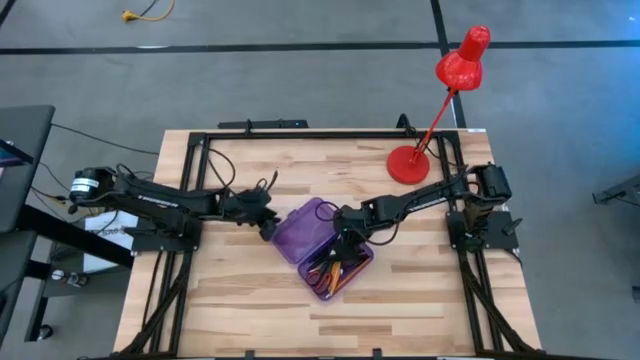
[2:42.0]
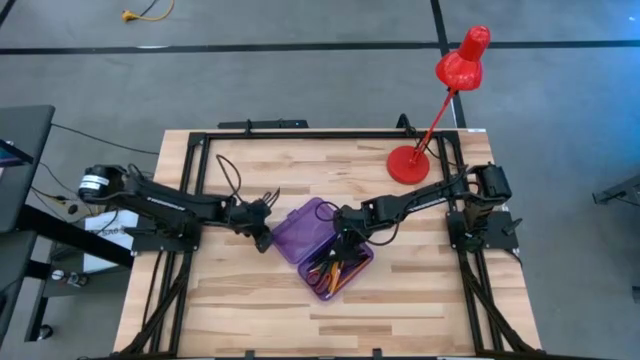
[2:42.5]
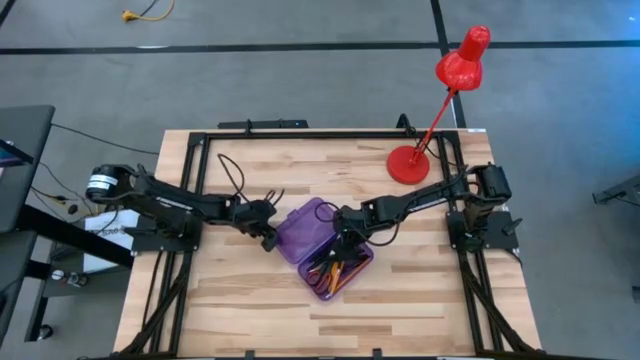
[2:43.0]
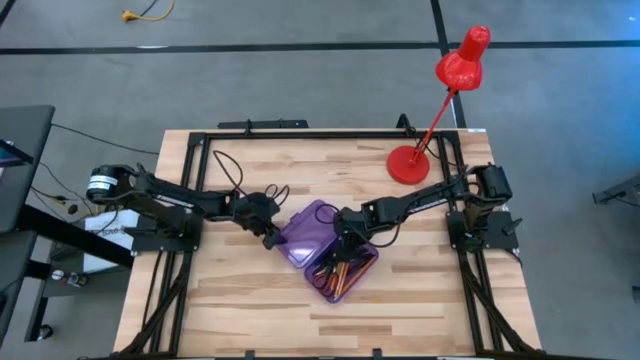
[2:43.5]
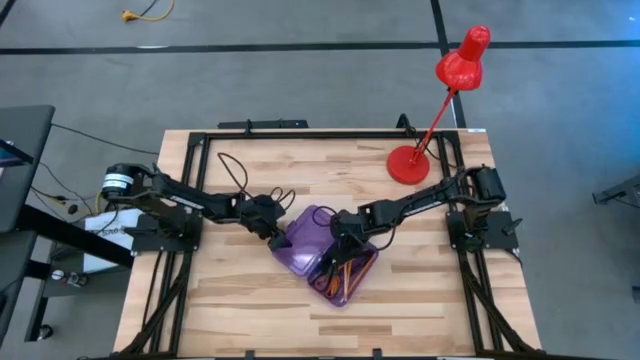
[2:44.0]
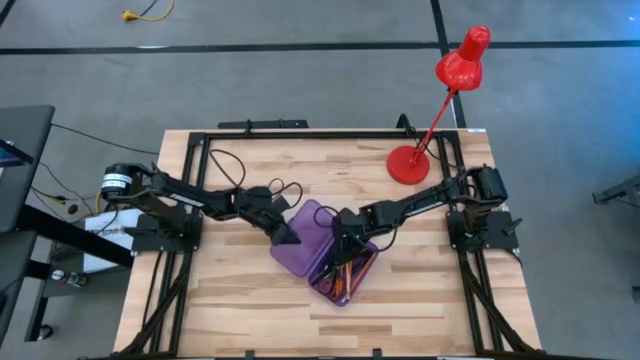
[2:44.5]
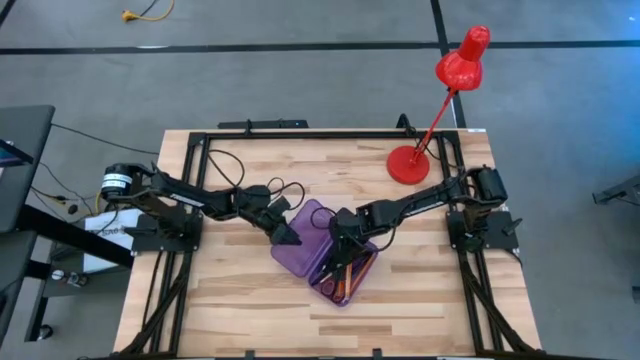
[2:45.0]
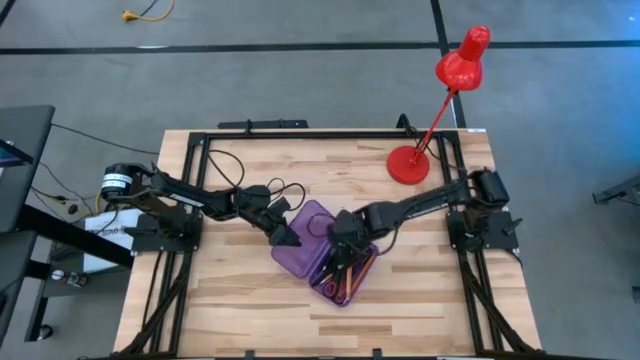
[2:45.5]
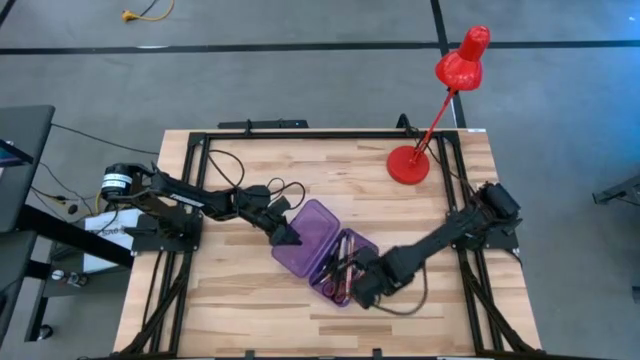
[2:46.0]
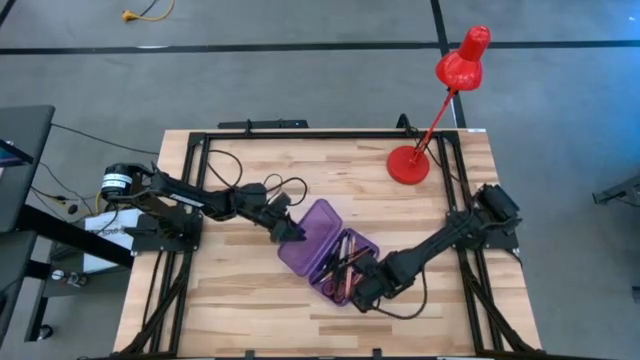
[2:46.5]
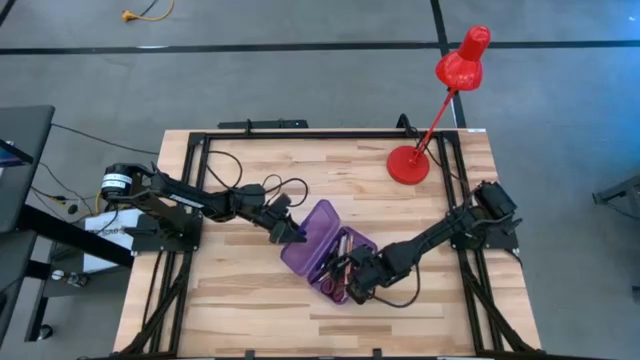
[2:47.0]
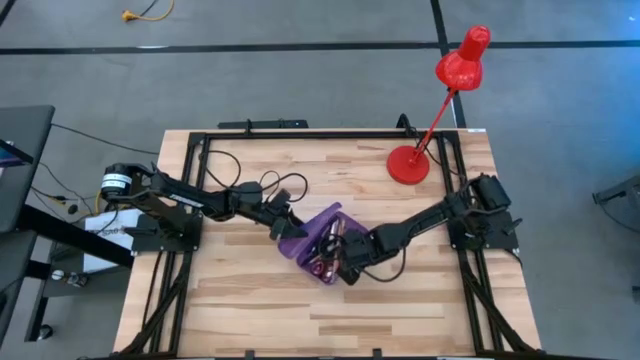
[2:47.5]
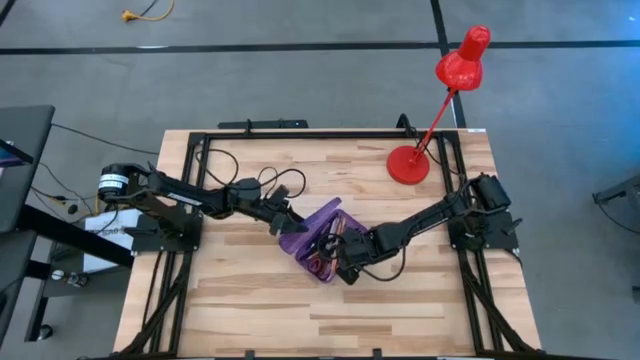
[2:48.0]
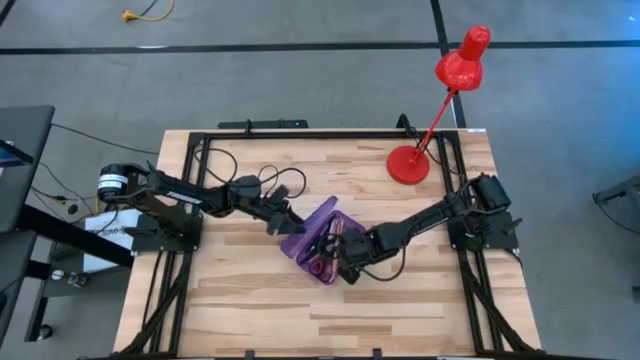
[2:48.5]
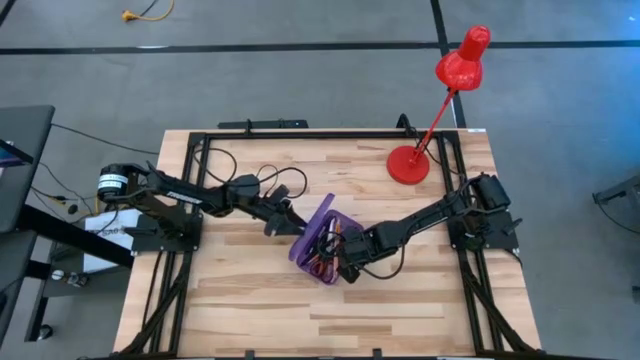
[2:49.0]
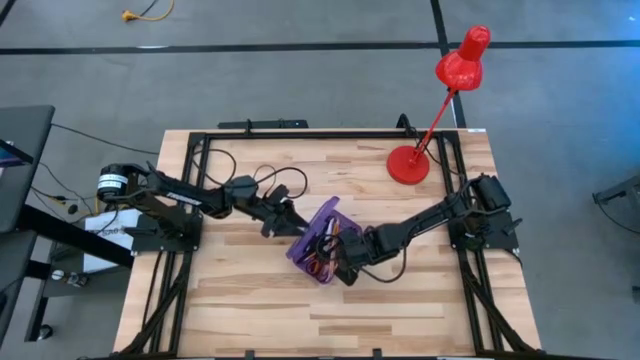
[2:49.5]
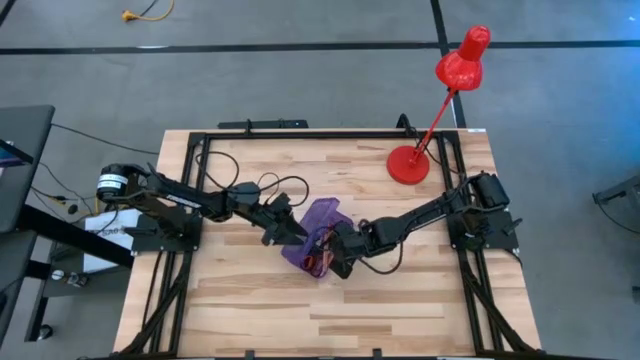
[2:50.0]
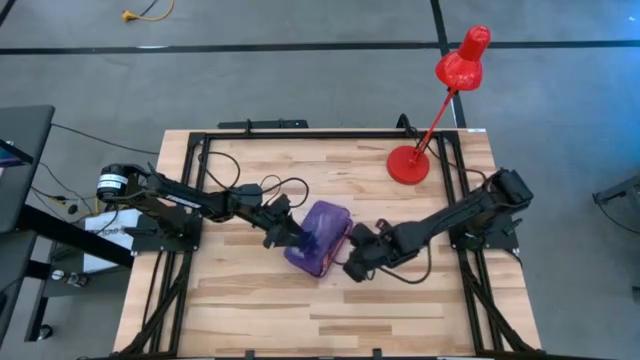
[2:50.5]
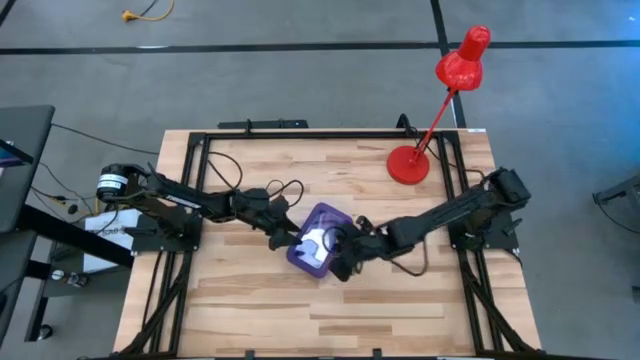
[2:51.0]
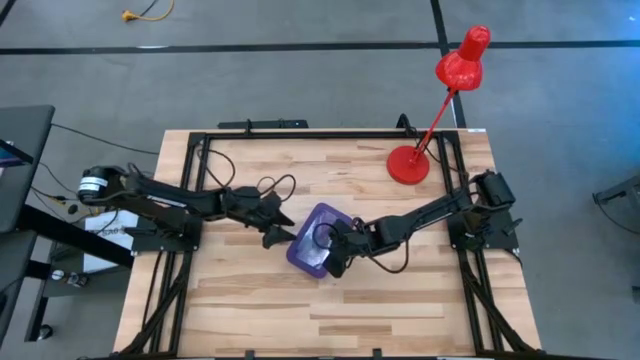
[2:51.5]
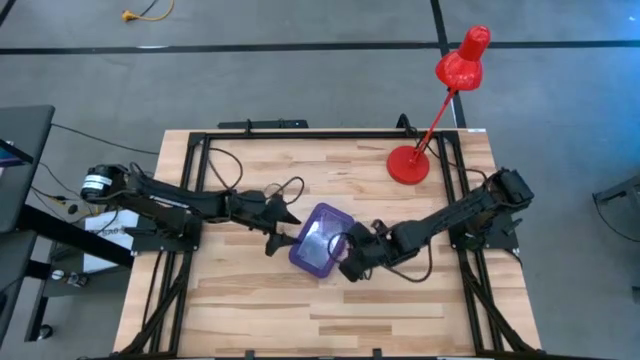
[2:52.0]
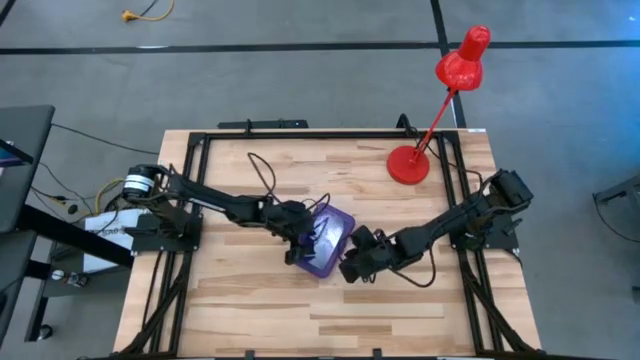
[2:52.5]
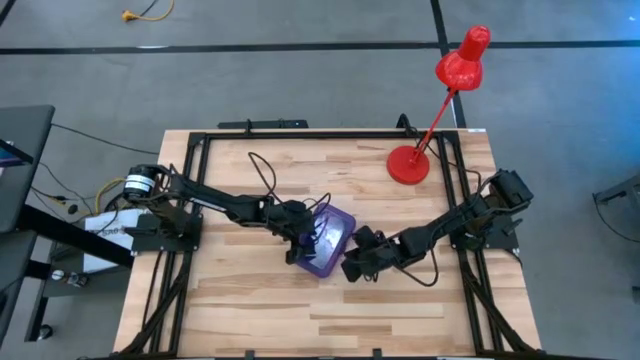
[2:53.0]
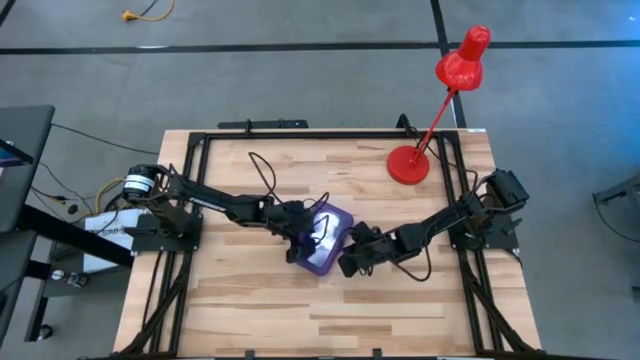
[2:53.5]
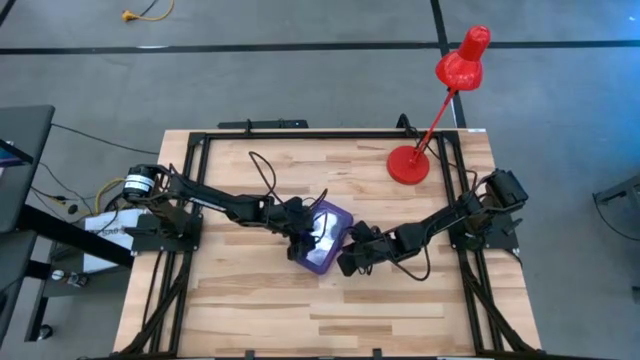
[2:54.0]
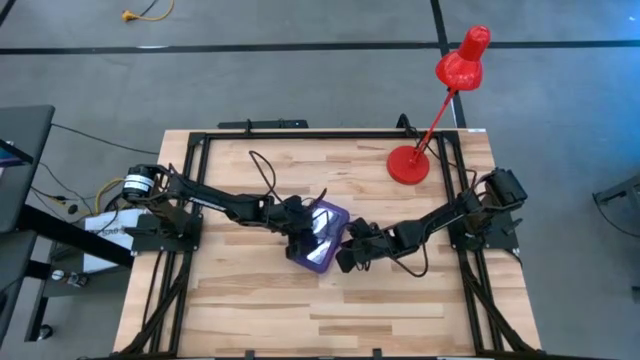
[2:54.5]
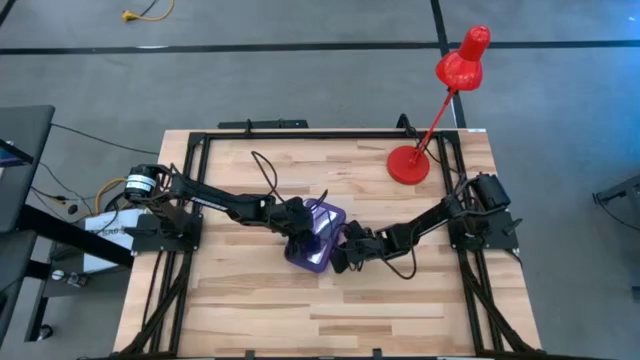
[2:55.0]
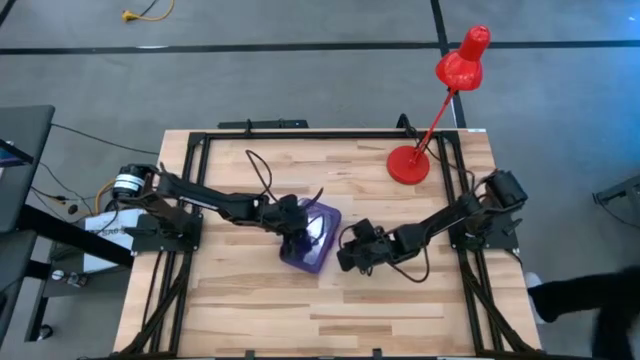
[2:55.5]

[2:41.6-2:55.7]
Task: Pick & place school supplies into a supply box
Close the purple supply box

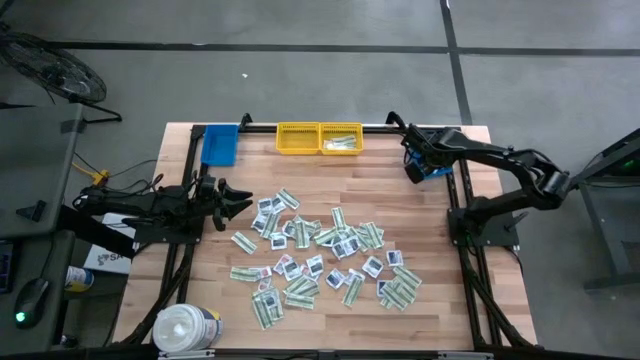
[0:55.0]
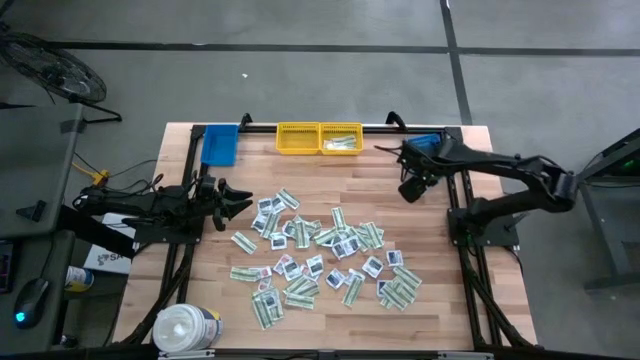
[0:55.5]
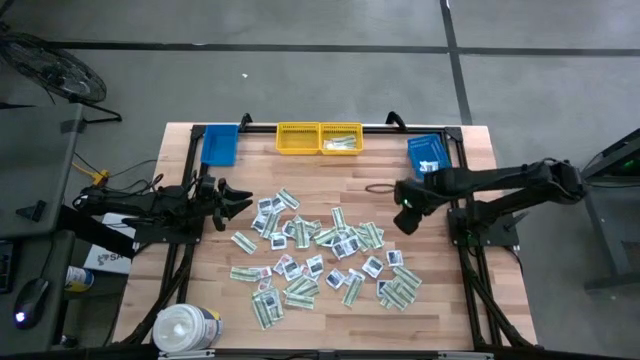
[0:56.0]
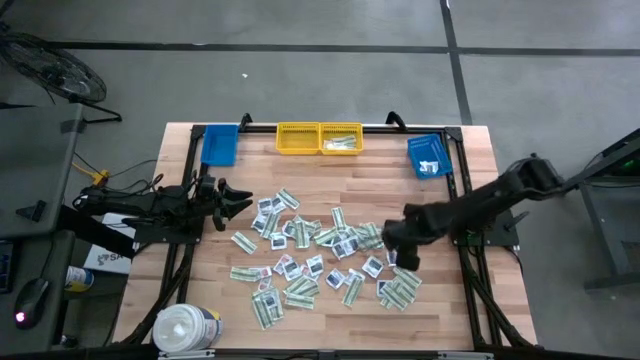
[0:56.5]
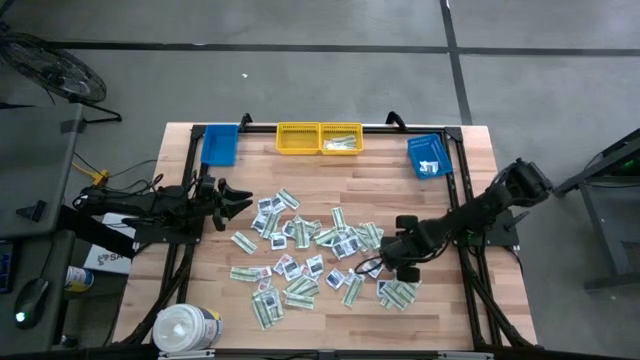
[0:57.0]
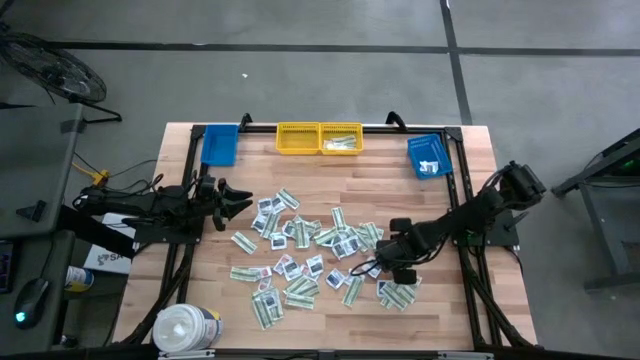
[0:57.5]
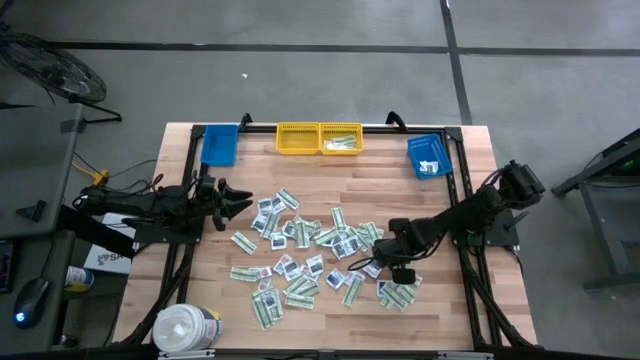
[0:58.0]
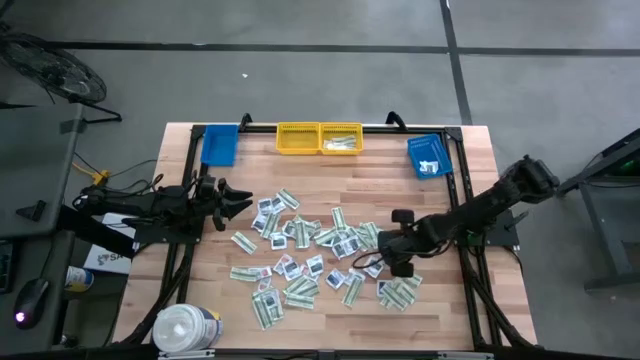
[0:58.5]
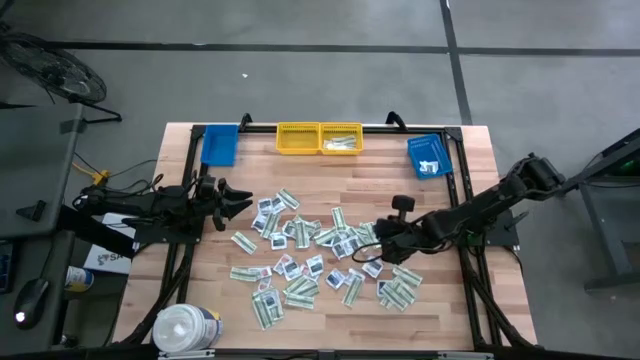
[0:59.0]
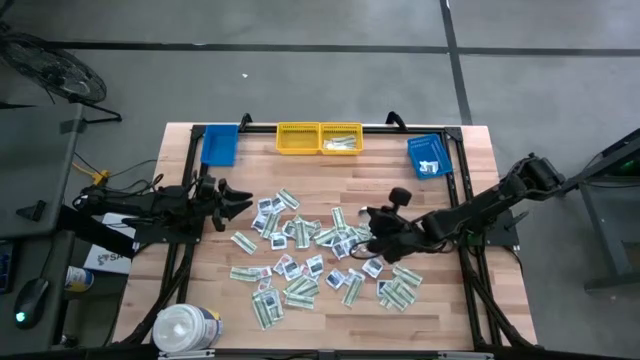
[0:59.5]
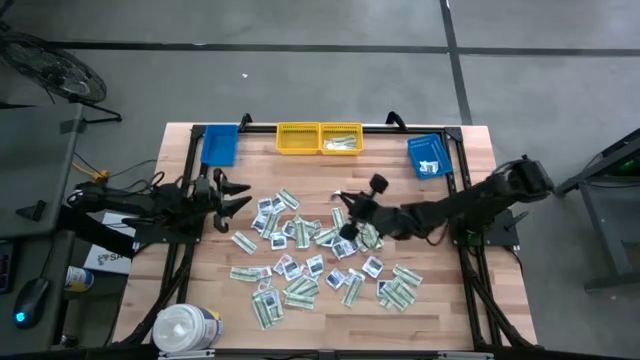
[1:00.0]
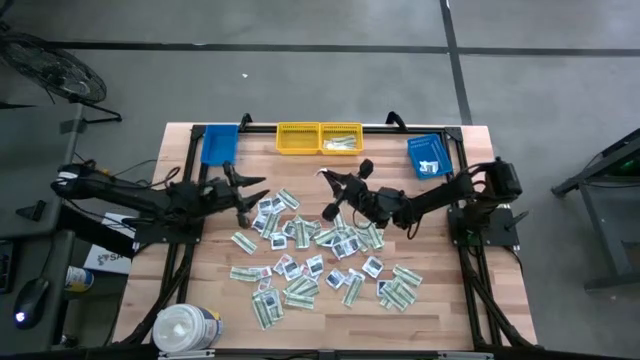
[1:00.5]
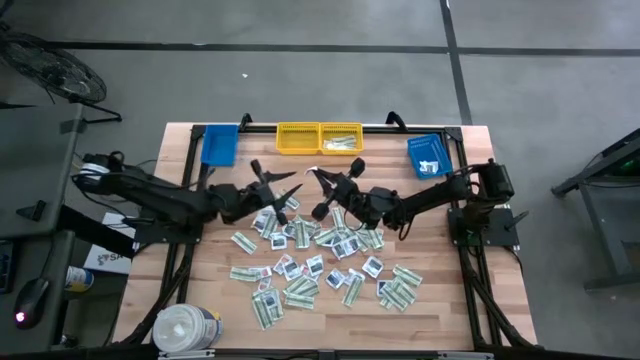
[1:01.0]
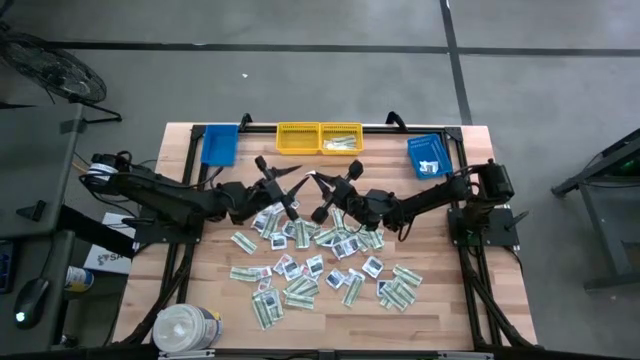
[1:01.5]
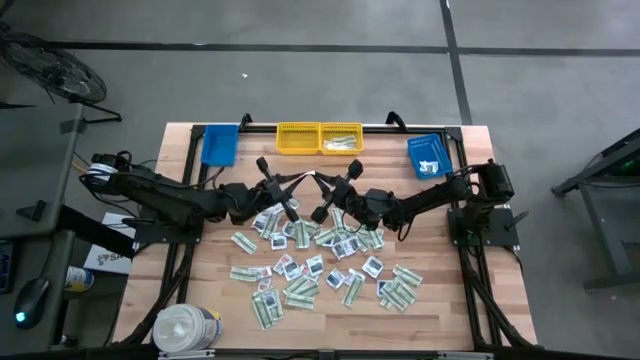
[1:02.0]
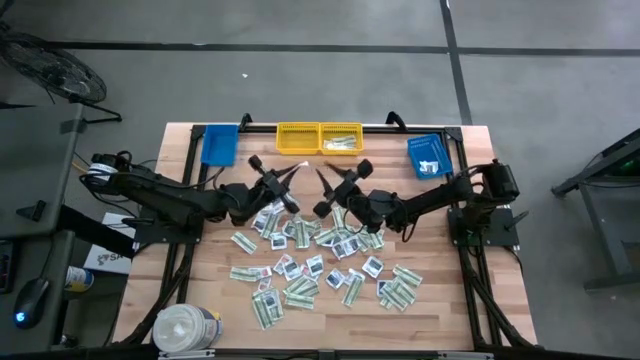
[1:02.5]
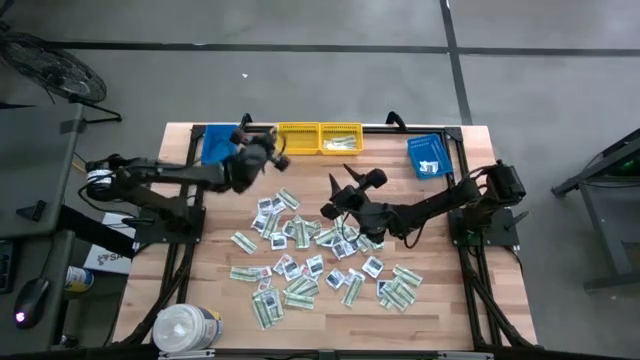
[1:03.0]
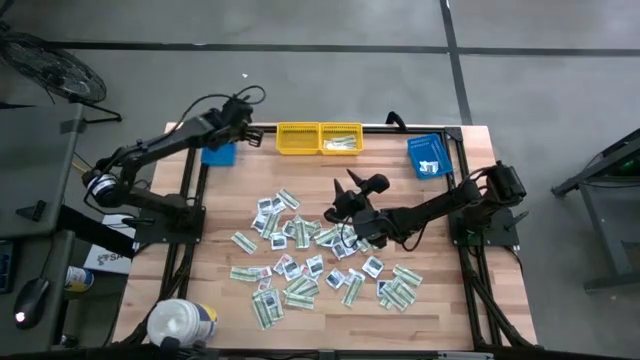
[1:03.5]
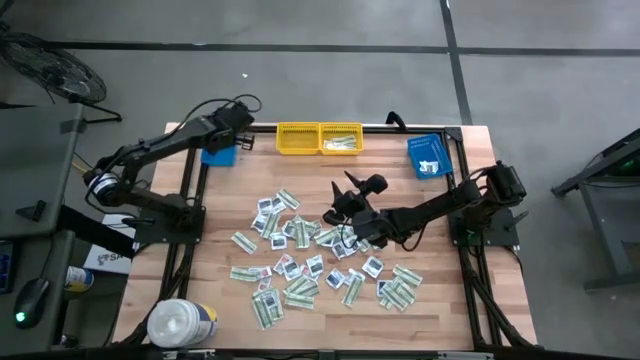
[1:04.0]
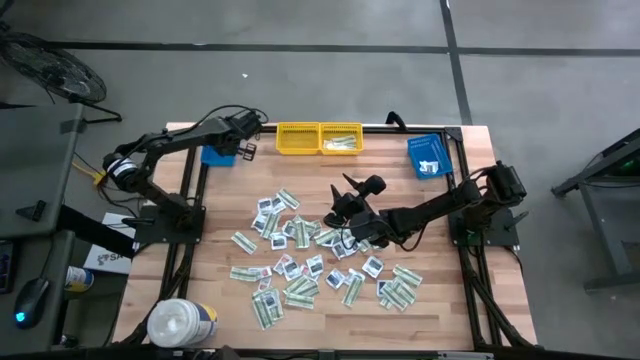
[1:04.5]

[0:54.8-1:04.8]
Task: Pick & Place First Aid Supplies
Put the blue alcohol pad into the left blue bin
